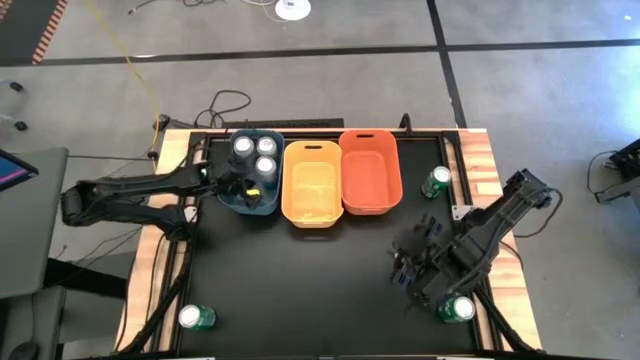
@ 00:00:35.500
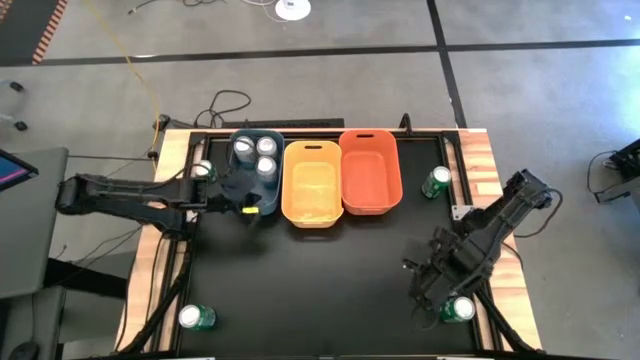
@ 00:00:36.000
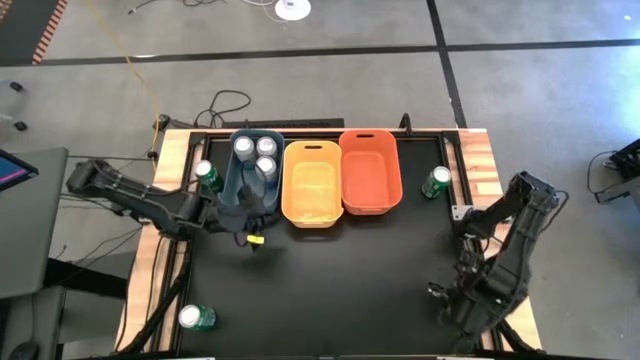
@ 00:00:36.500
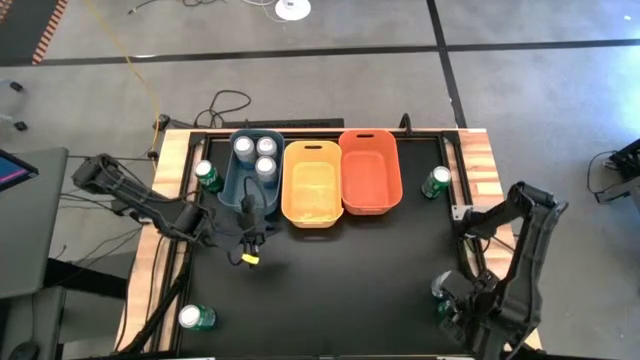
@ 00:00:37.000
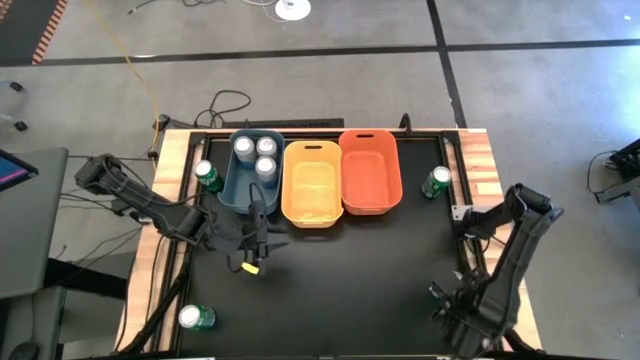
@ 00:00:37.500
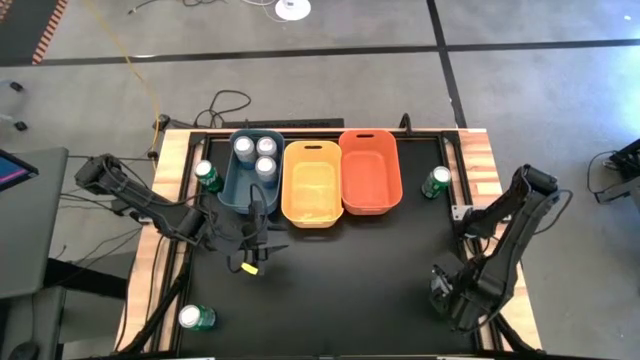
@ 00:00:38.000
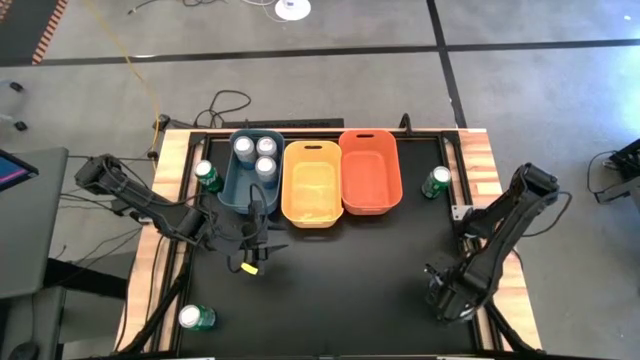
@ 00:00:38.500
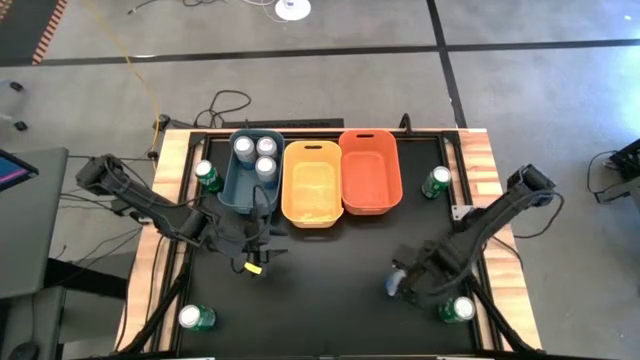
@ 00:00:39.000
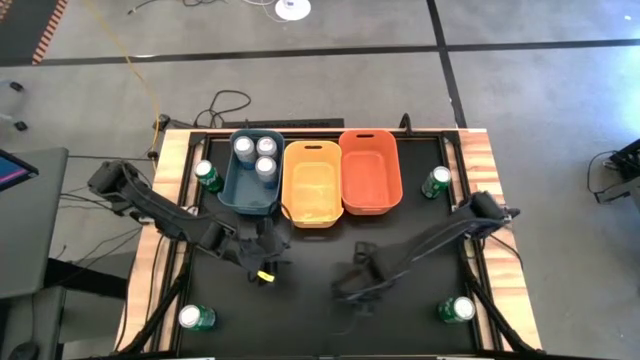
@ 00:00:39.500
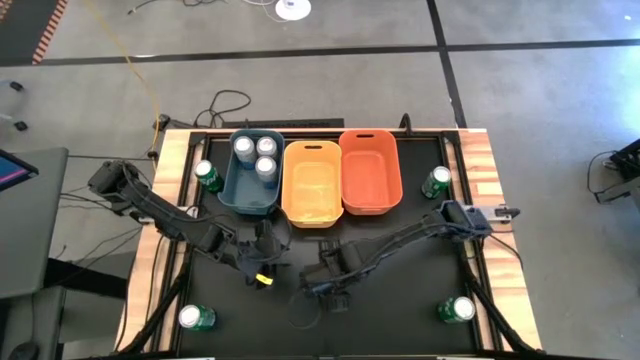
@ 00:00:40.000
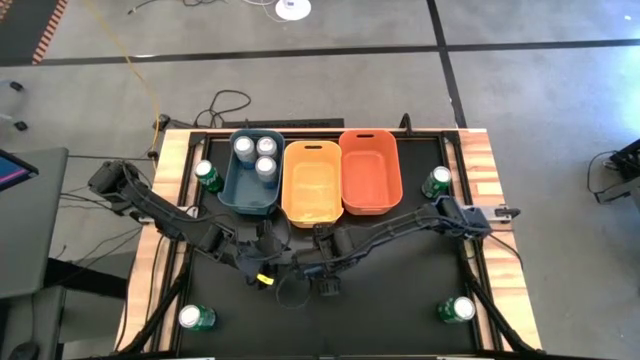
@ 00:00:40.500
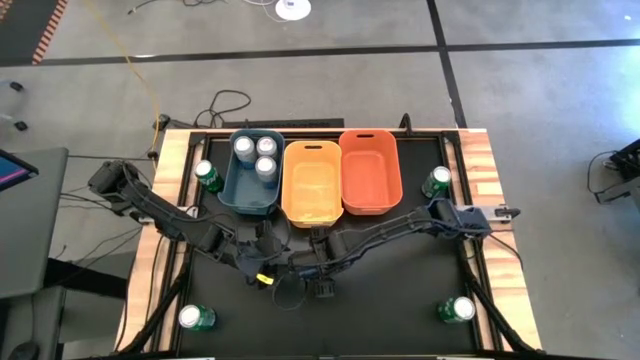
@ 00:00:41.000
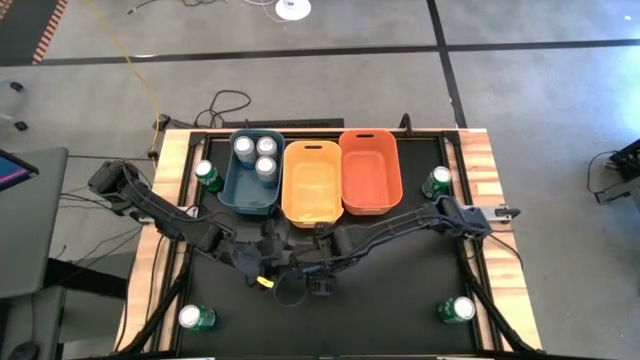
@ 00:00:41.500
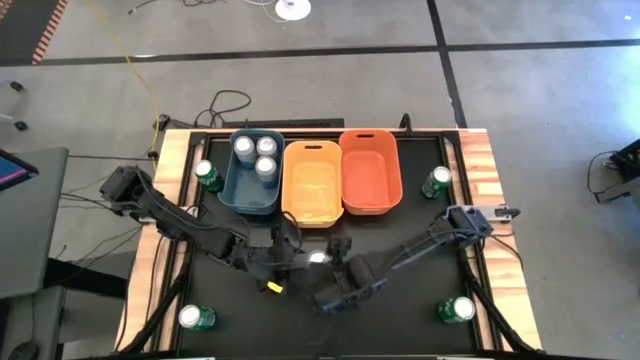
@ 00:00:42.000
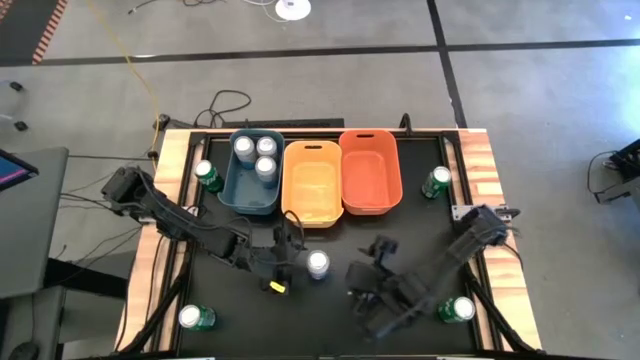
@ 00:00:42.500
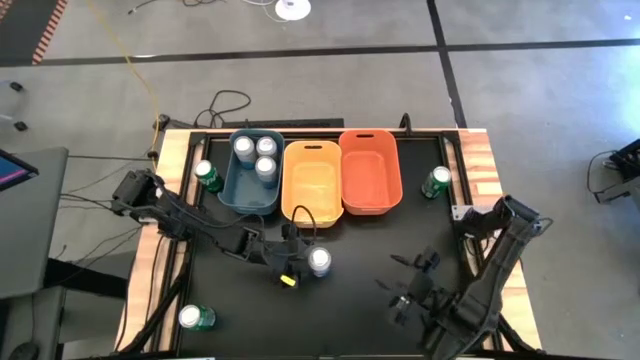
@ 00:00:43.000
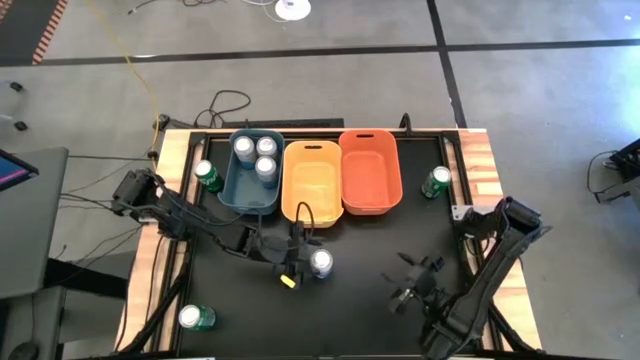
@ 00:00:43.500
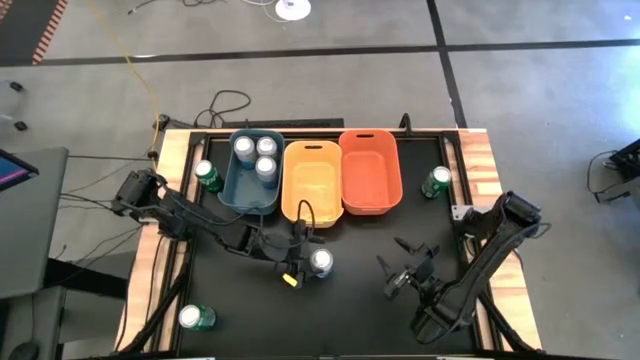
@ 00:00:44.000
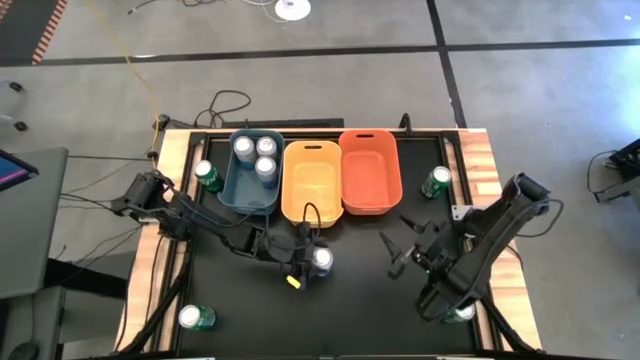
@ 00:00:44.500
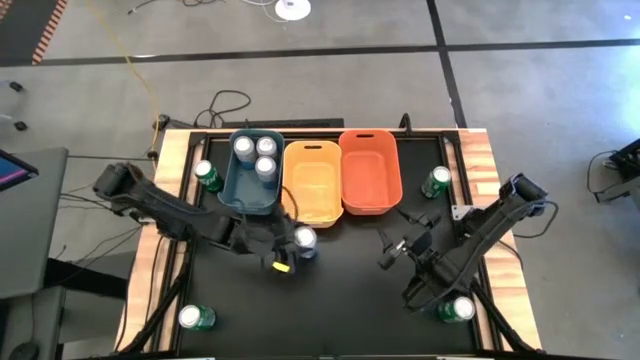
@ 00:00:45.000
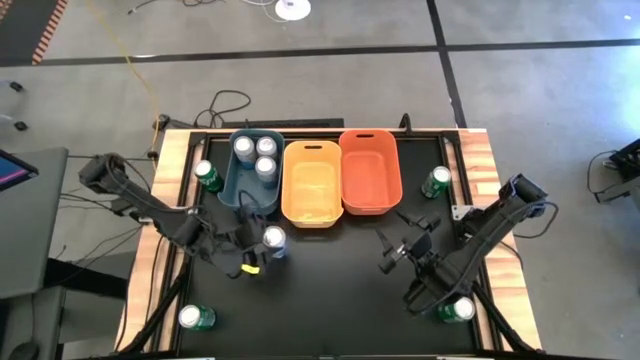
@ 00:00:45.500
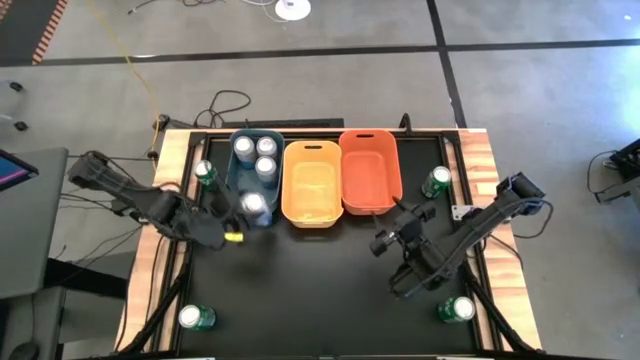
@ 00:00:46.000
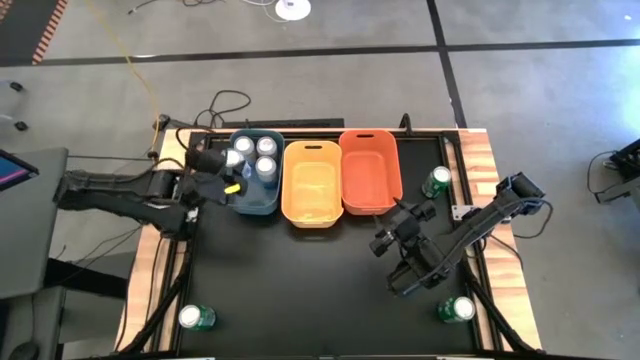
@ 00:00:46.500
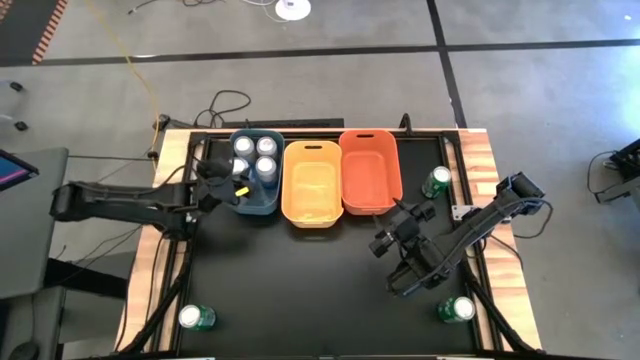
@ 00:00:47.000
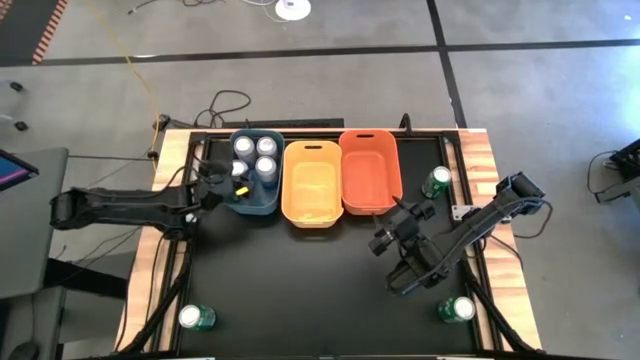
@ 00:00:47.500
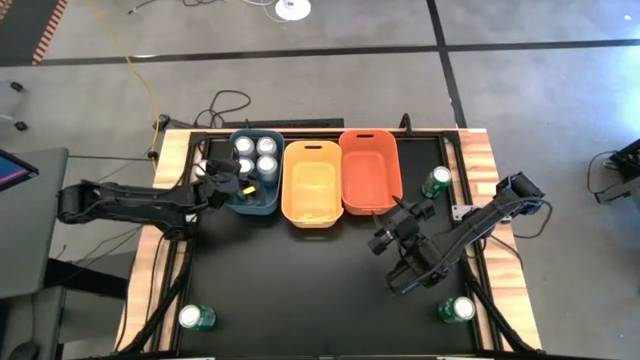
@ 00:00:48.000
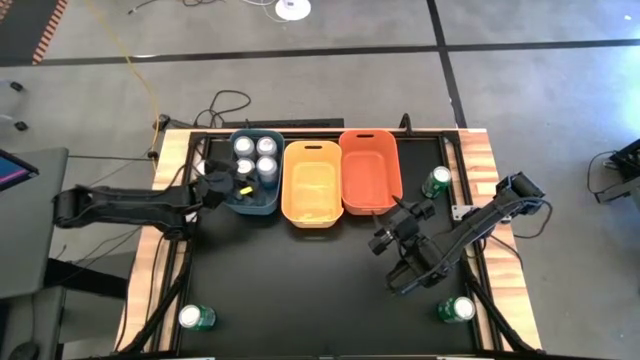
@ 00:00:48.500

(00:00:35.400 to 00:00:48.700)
Task: Sort soda cans
Put the white soda can into the blue bin

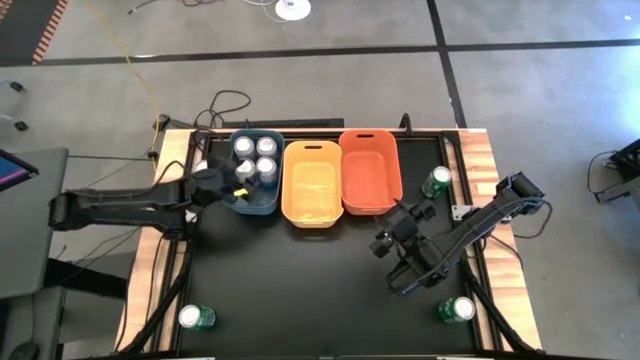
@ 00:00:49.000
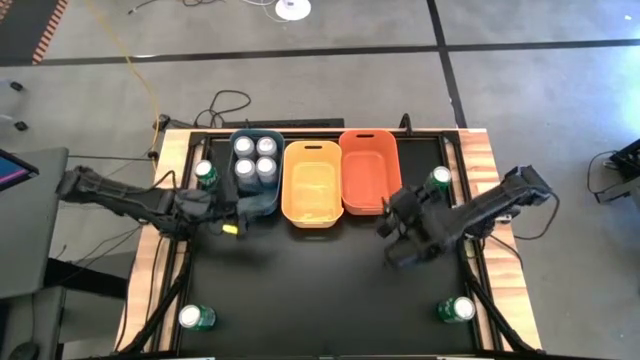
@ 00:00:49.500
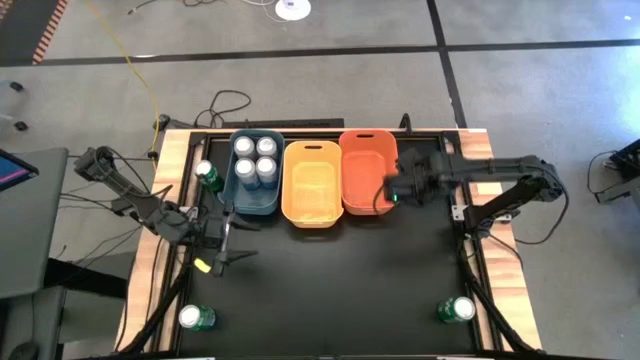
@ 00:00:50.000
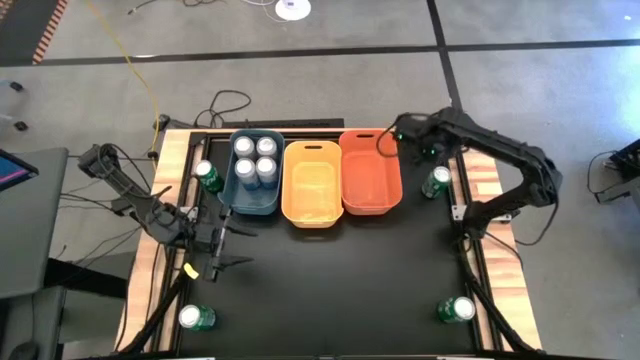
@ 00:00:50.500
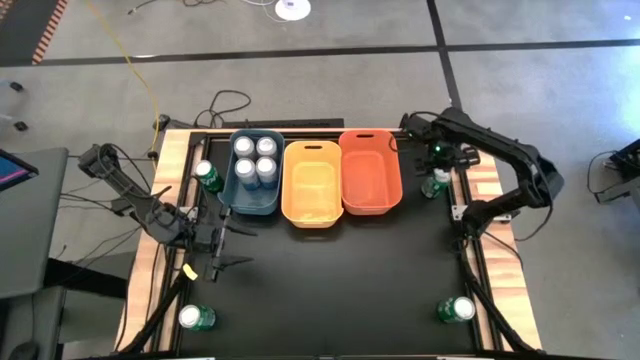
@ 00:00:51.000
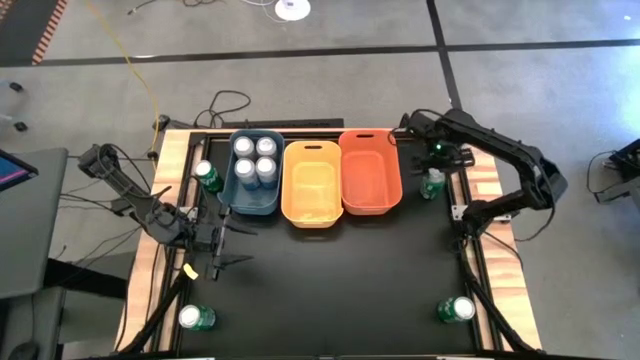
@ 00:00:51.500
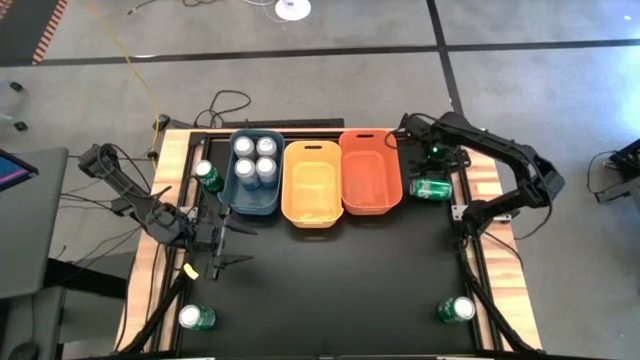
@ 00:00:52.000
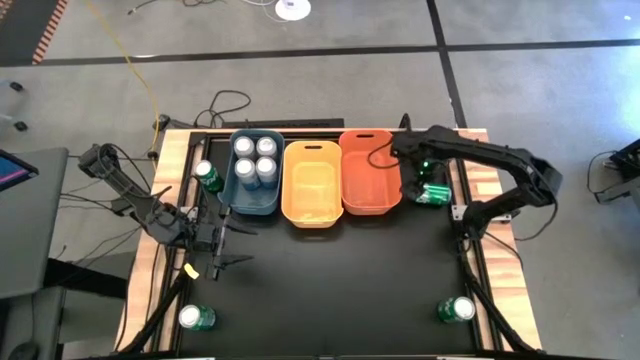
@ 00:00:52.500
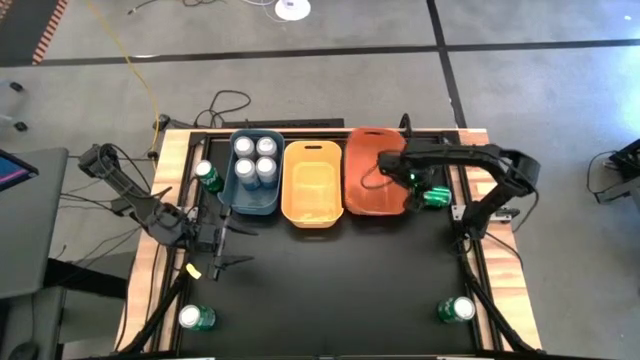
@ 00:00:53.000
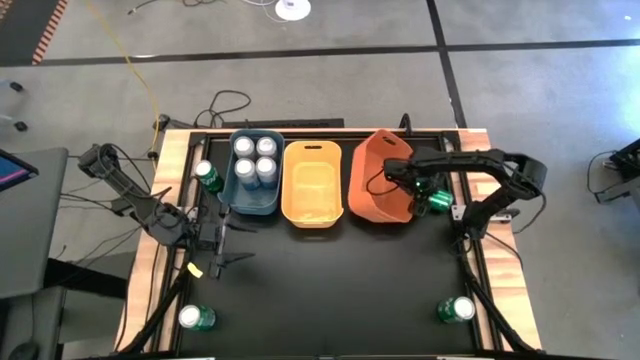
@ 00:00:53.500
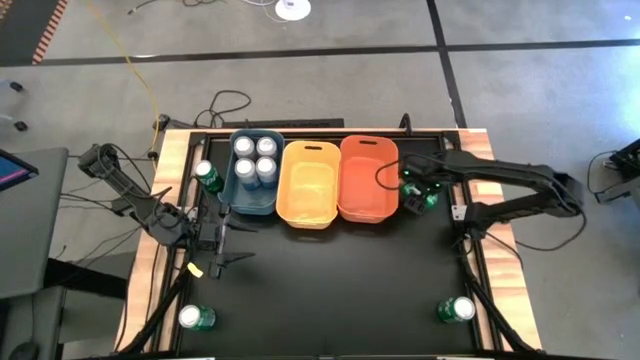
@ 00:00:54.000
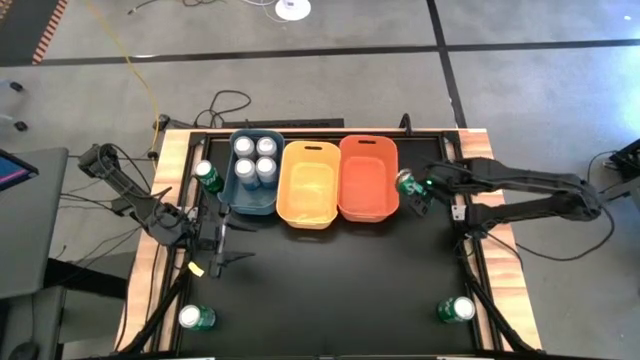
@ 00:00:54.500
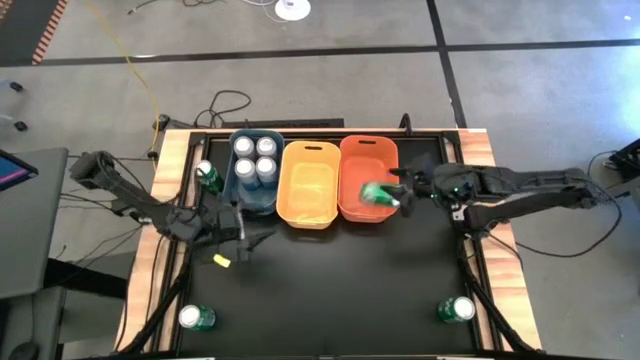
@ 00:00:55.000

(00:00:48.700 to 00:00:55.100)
Put the green soda can into the yellow bin
